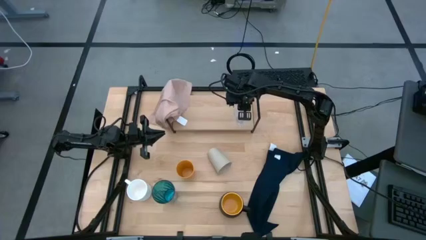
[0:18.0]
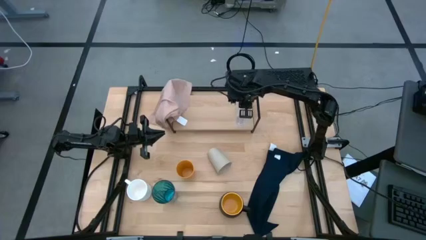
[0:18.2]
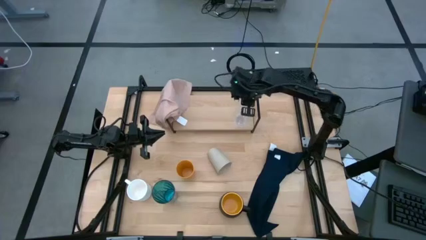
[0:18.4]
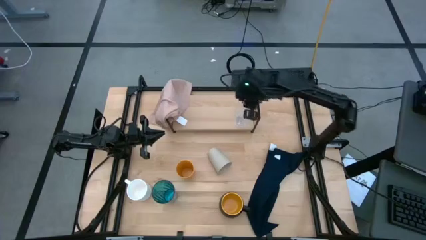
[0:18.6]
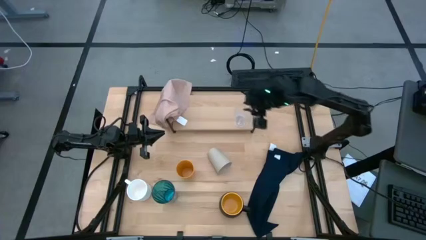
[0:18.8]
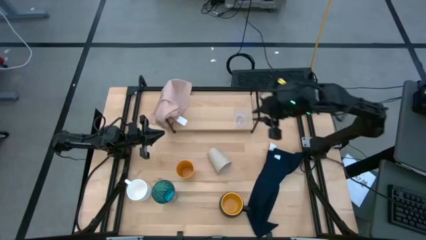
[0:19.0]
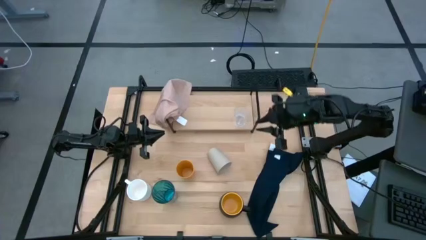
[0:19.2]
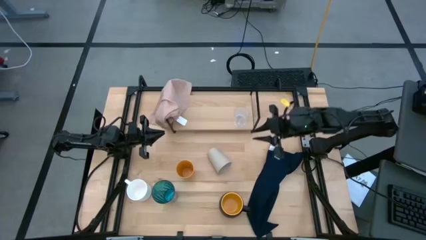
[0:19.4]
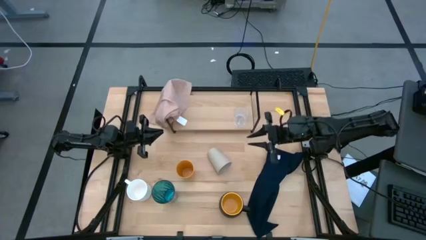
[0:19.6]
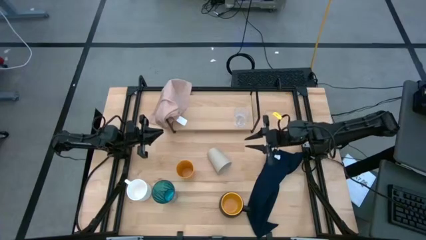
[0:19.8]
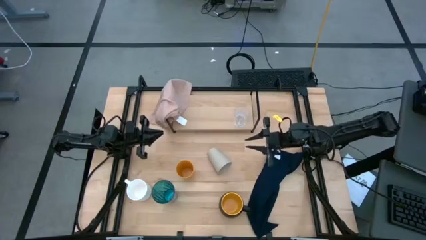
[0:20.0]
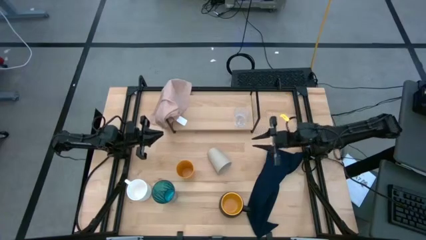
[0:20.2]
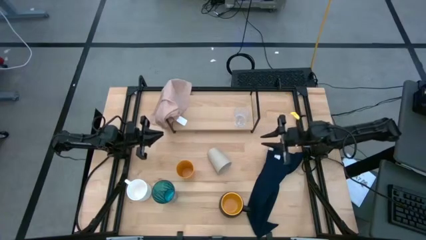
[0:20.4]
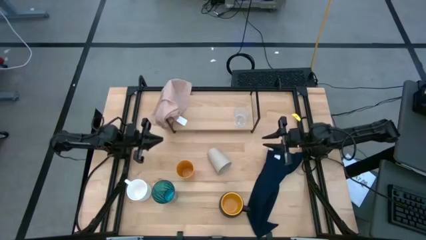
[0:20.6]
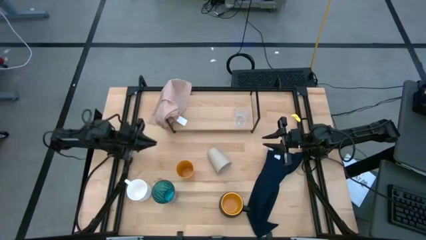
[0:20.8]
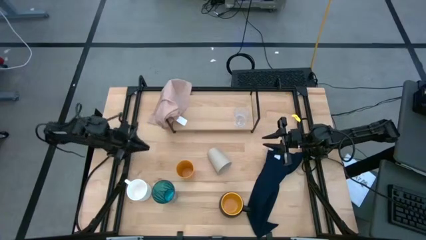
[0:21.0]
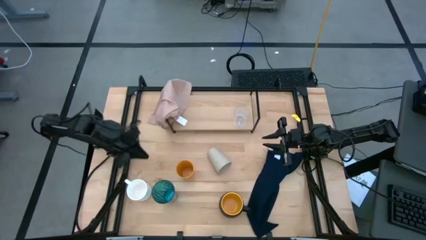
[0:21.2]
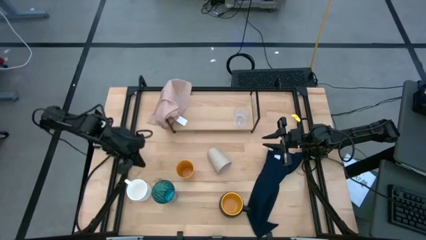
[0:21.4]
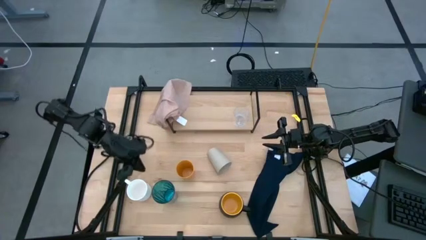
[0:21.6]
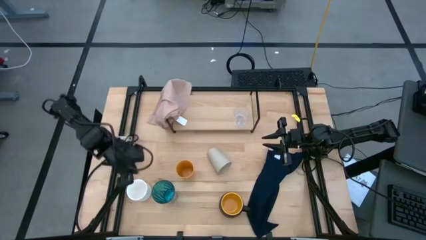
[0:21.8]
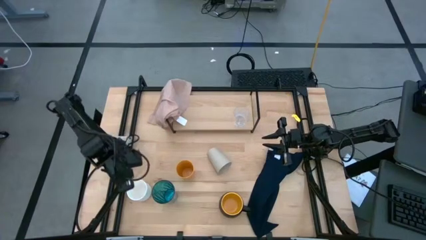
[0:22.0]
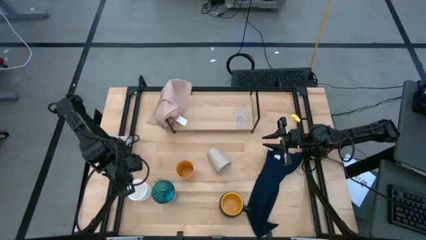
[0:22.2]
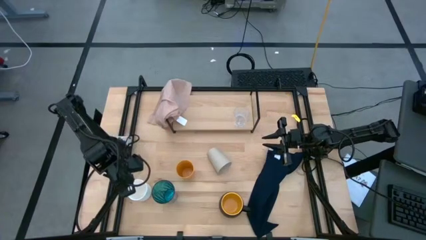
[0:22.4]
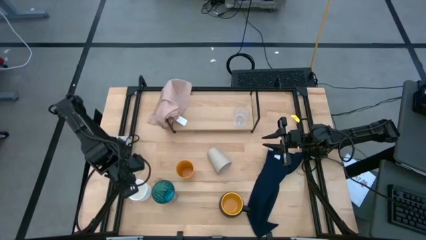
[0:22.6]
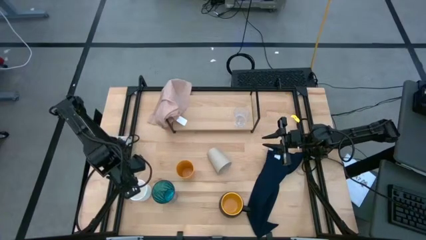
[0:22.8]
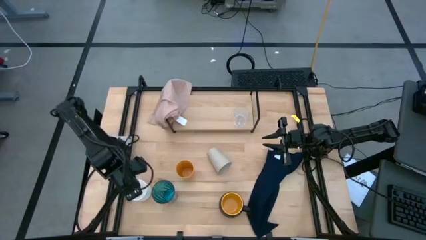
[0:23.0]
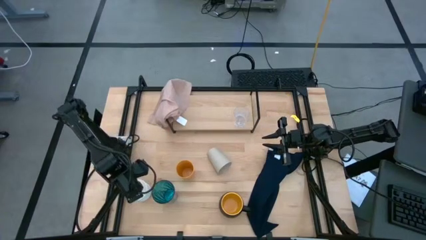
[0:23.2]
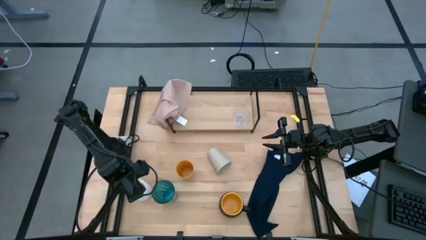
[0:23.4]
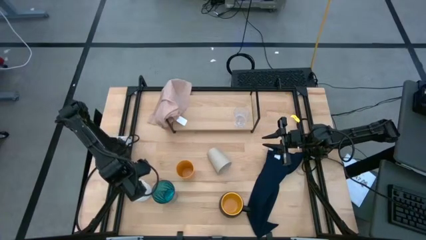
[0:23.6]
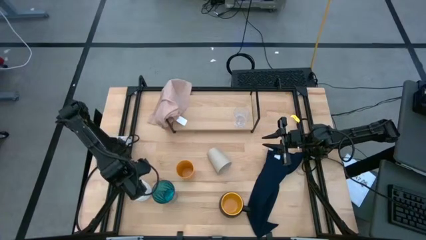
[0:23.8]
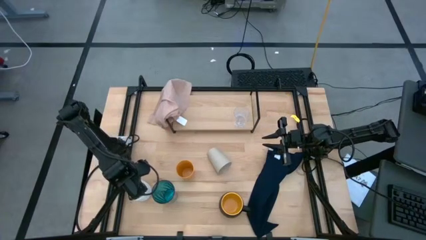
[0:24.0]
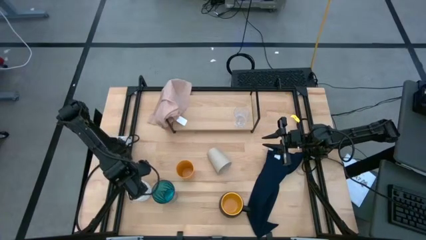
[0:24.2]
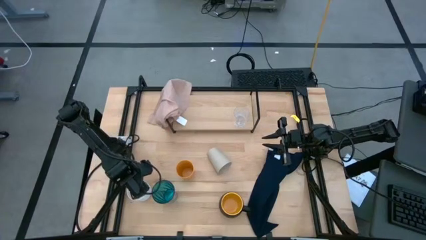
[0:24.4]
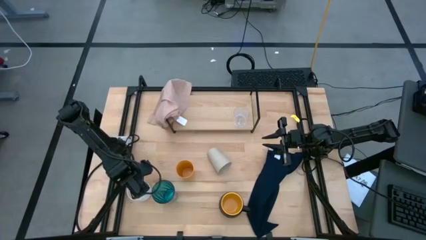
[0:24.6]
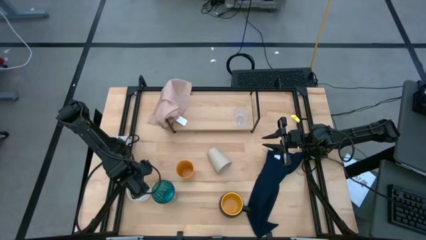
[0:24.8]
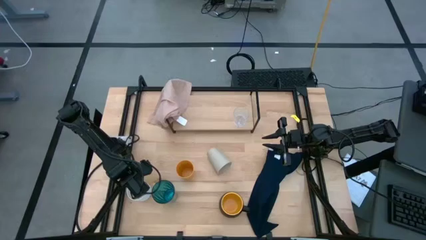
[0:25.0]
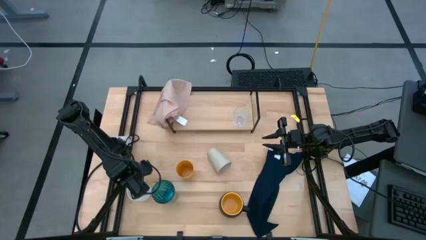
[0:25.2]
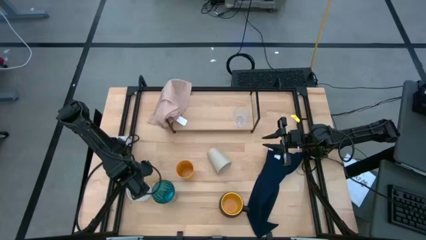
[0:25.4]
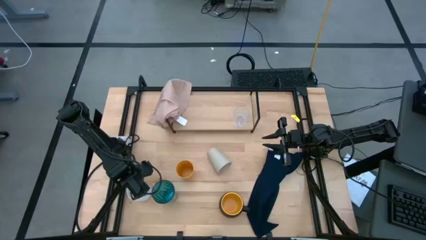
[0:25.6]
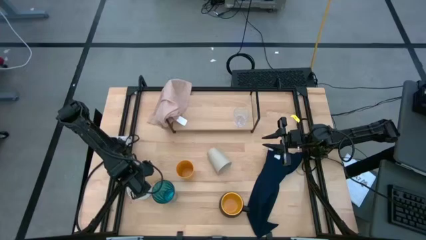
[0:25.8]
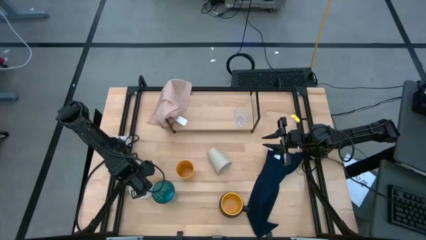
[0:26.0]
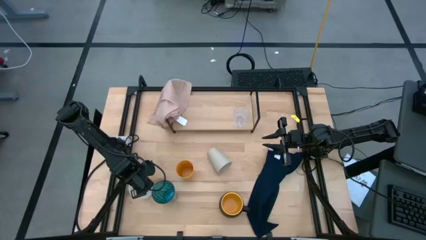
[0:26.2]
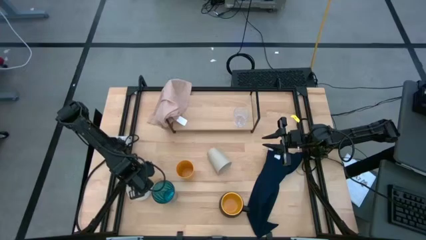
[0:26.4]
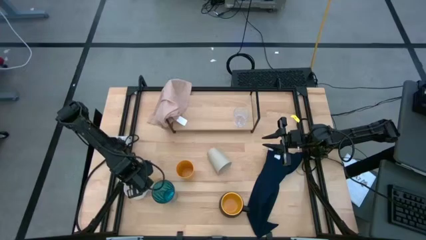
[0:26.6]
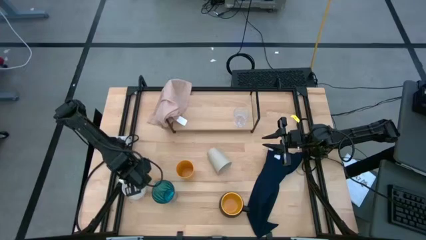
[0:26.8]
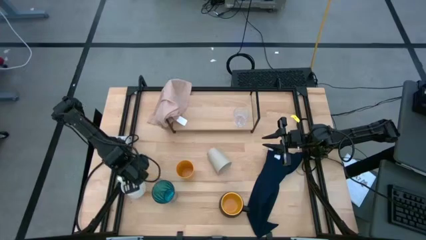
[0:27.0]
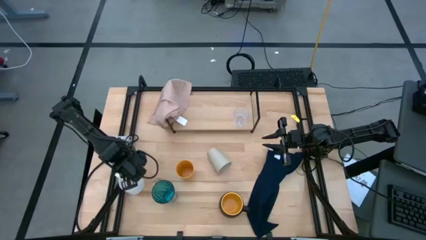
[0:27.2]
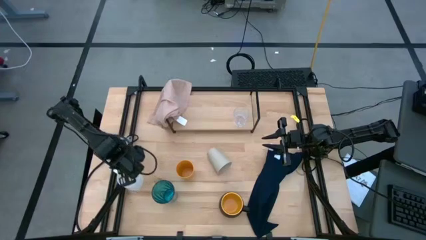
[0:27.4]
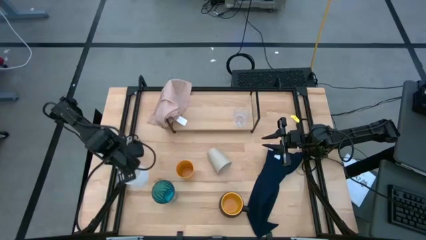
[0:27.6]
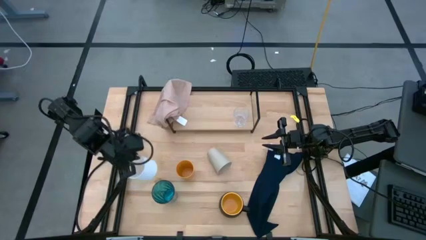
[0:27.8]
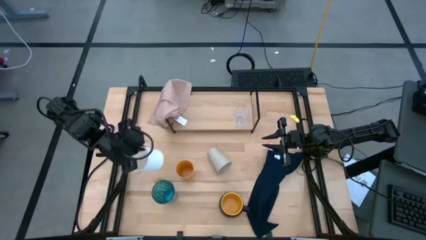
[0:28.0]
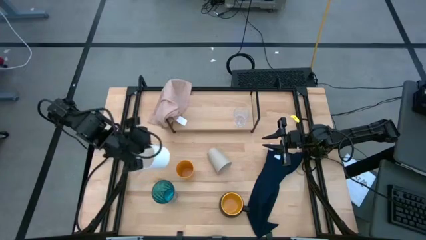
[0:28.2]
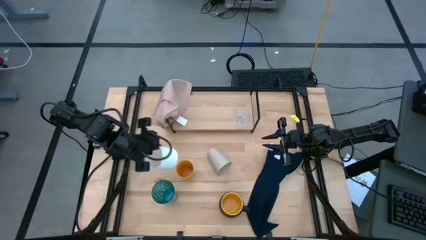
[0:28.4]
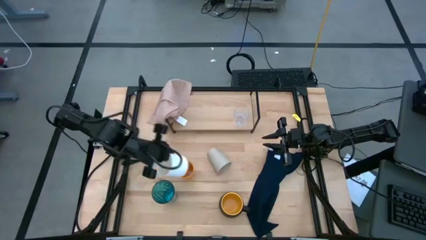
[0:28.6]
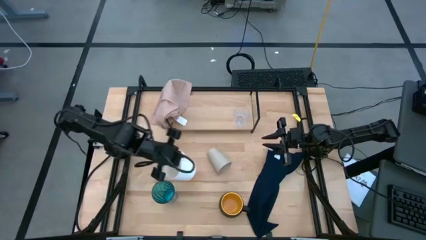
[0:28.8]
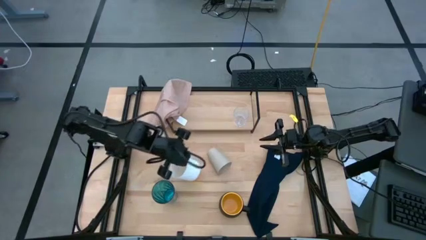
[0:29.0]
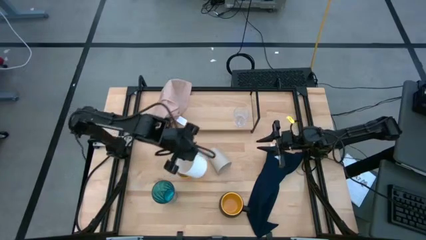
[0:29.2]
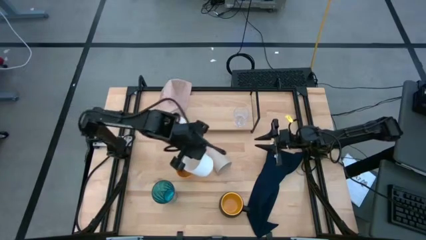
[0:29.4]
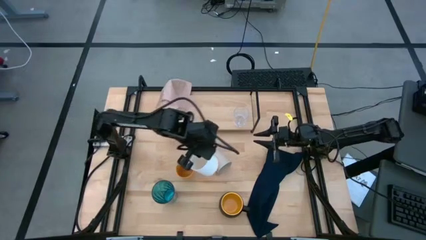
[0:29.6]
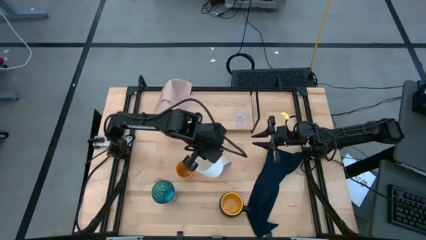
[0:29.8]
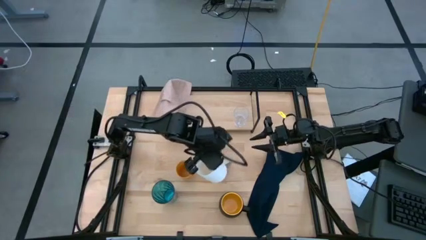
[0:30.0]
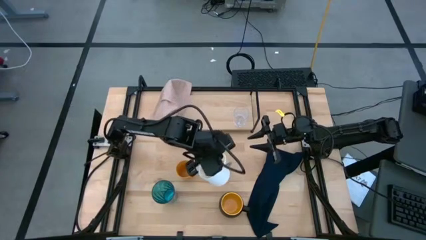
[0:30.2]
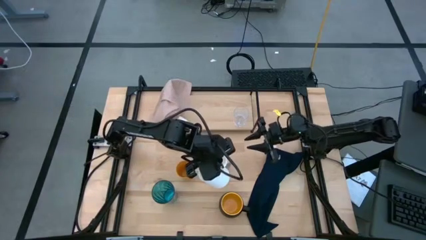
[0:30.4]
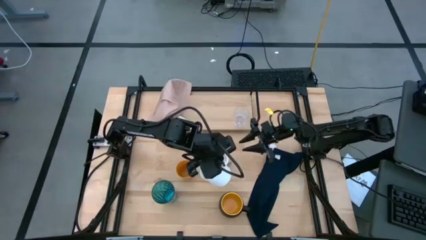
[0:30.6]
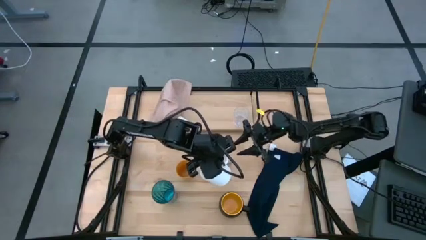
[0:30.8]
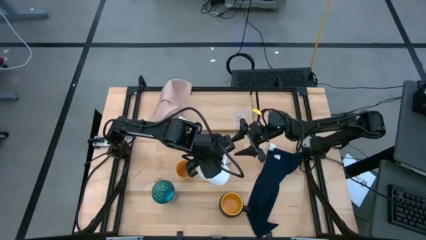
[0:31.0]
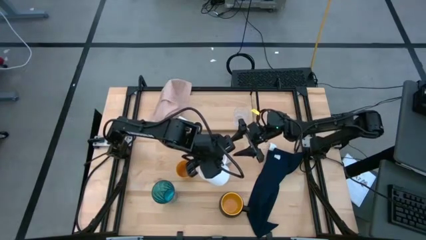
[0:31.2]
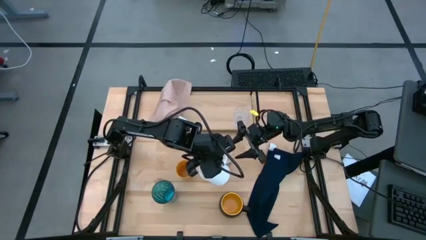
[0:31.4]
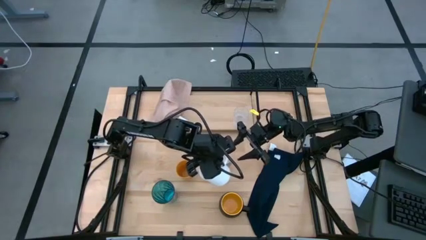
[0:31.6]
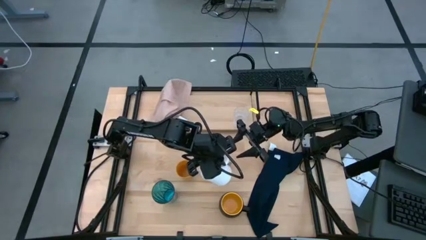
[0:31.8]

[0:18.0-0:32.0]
Task: Stack small to large cups/mugs on shelf
Put the white mug on the shelf
